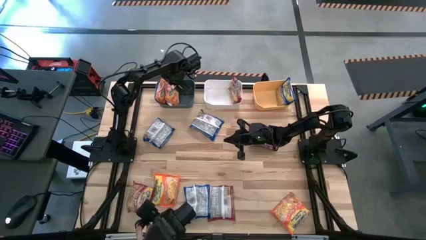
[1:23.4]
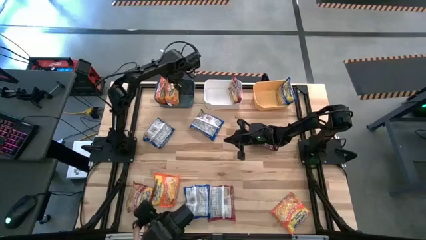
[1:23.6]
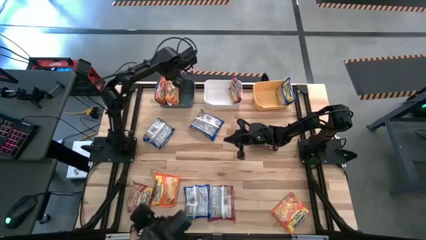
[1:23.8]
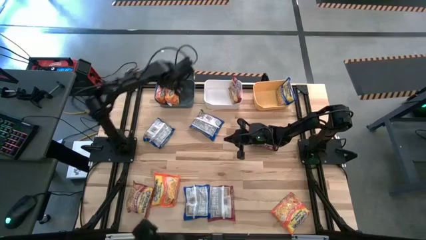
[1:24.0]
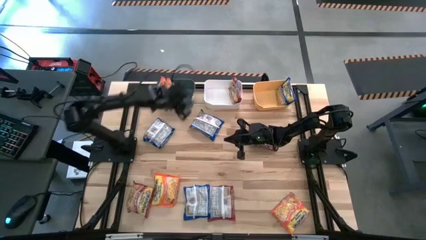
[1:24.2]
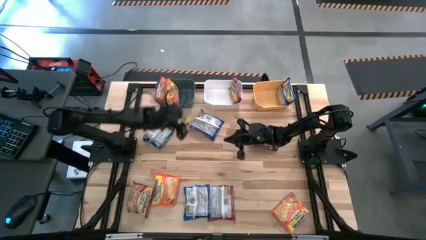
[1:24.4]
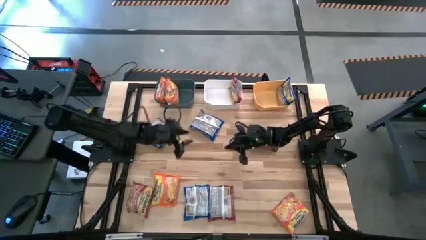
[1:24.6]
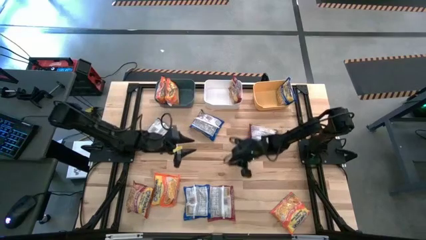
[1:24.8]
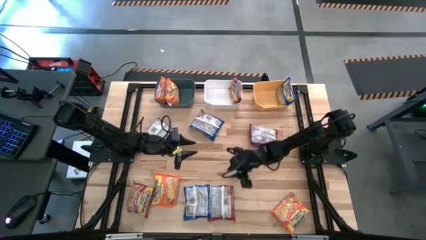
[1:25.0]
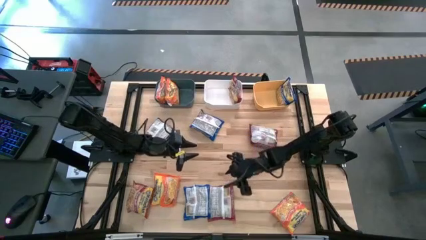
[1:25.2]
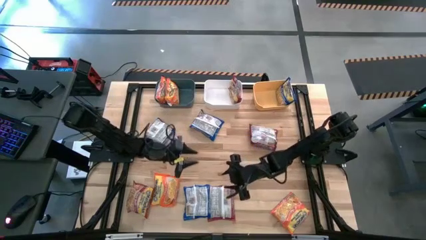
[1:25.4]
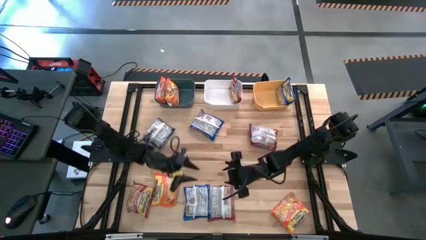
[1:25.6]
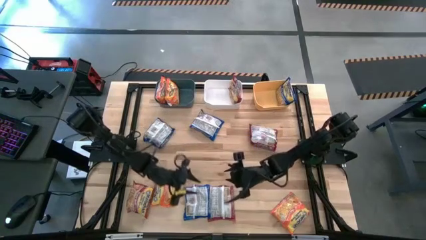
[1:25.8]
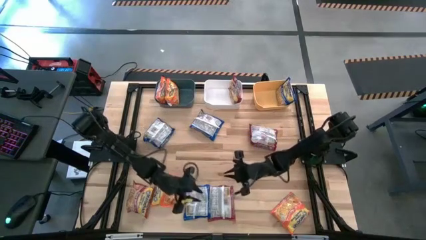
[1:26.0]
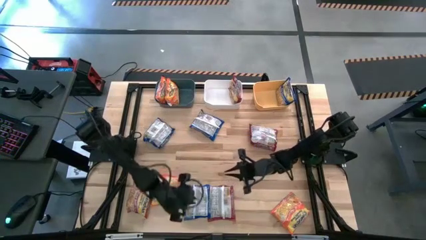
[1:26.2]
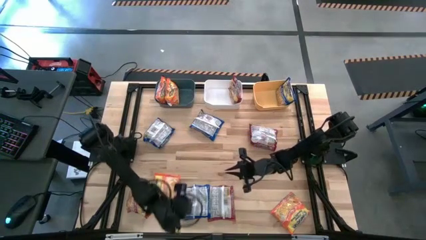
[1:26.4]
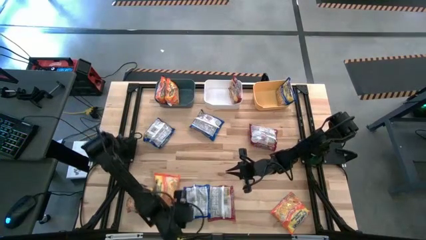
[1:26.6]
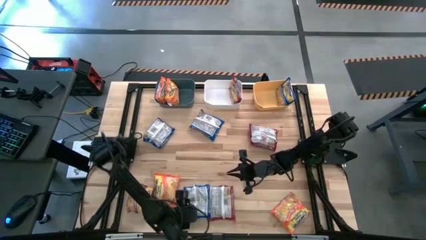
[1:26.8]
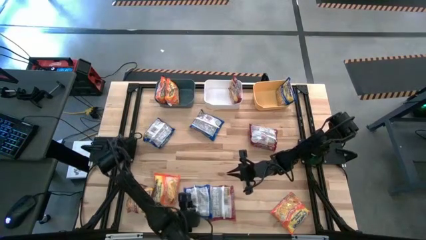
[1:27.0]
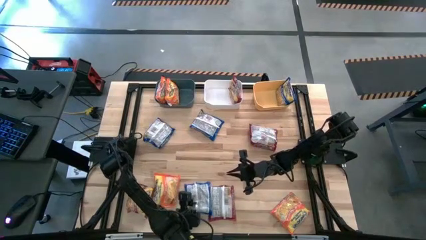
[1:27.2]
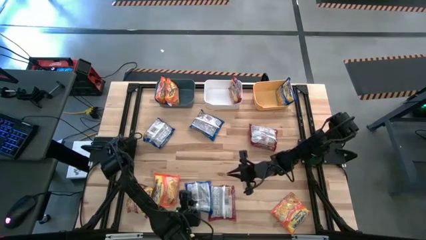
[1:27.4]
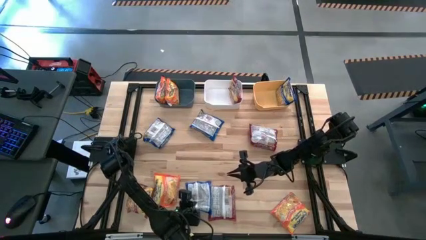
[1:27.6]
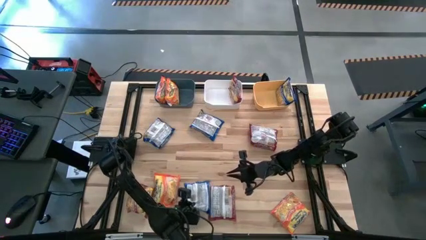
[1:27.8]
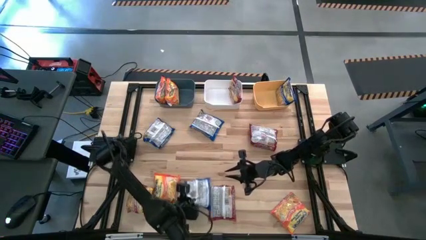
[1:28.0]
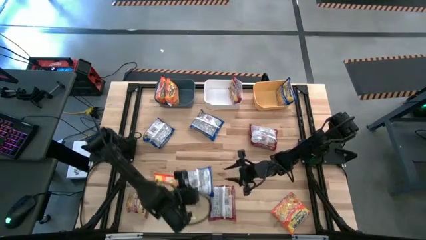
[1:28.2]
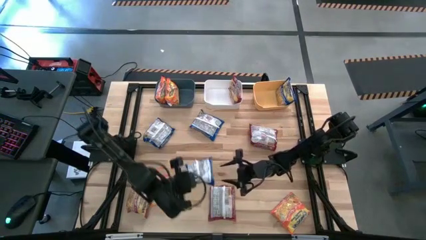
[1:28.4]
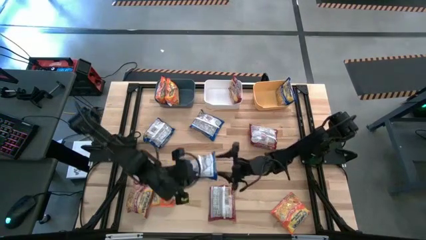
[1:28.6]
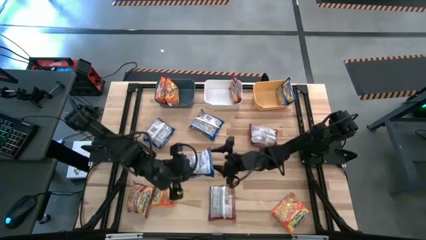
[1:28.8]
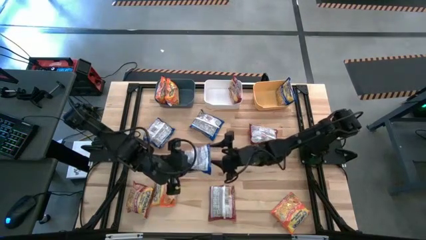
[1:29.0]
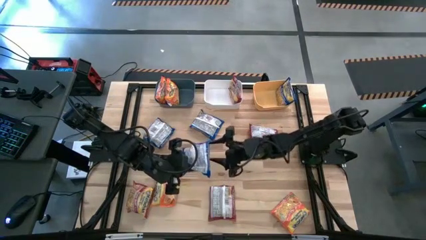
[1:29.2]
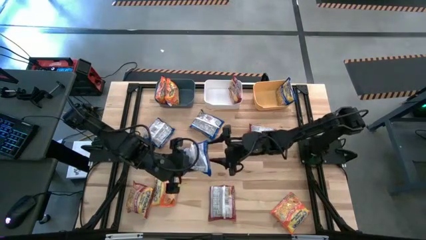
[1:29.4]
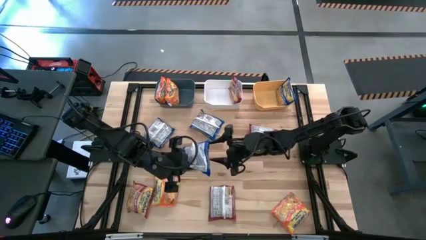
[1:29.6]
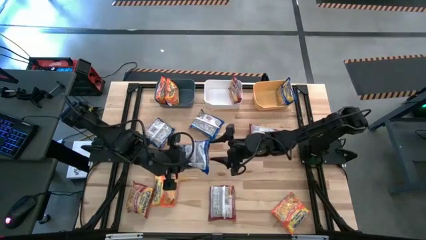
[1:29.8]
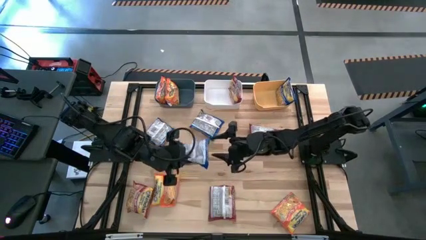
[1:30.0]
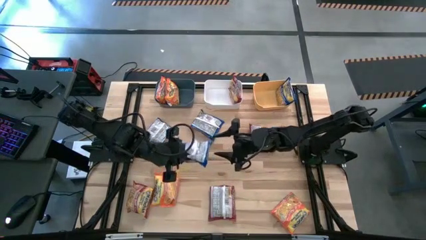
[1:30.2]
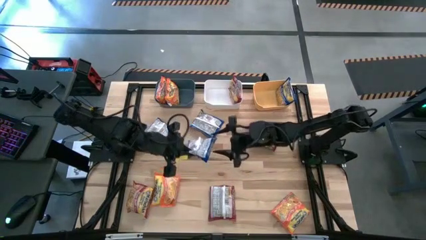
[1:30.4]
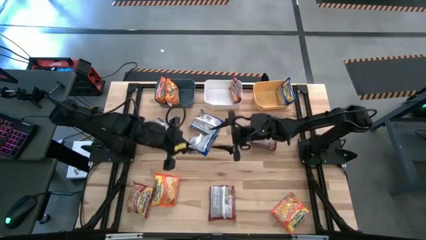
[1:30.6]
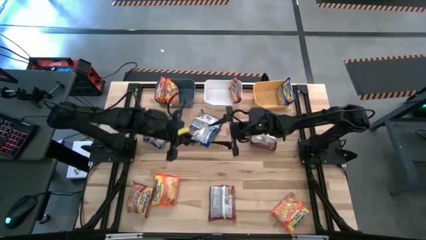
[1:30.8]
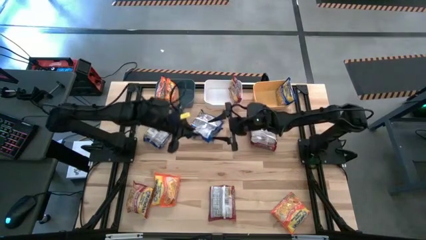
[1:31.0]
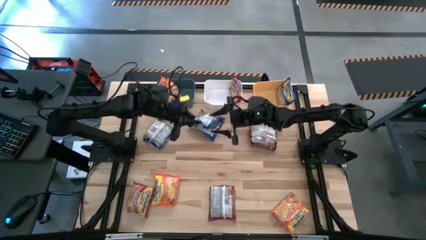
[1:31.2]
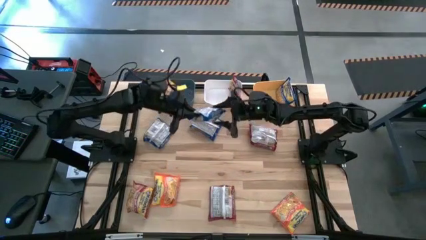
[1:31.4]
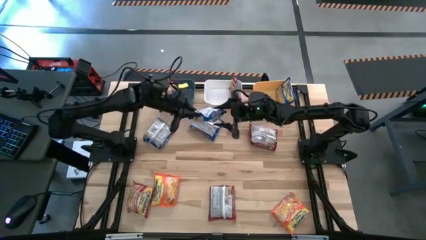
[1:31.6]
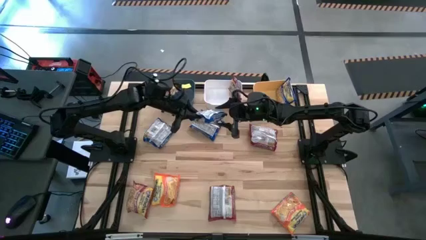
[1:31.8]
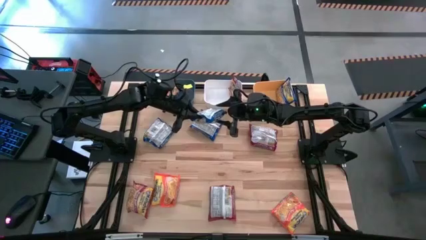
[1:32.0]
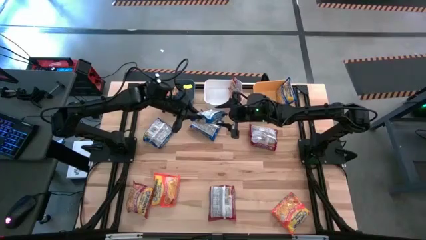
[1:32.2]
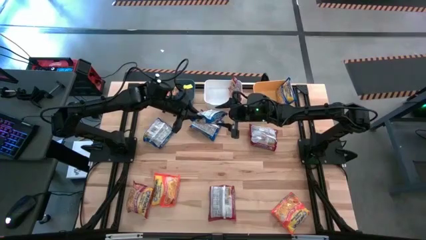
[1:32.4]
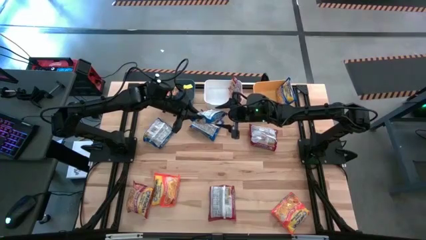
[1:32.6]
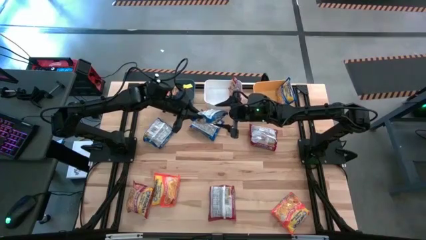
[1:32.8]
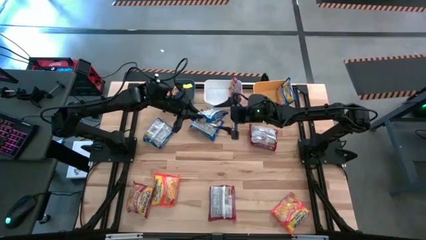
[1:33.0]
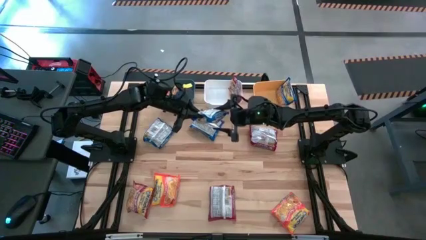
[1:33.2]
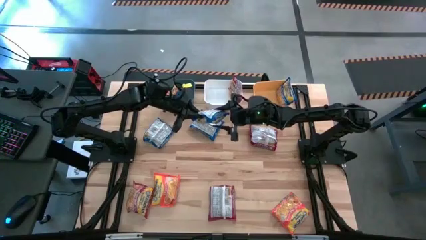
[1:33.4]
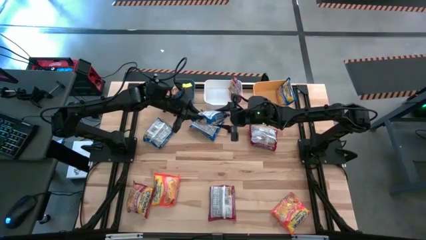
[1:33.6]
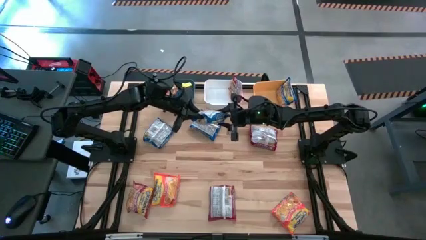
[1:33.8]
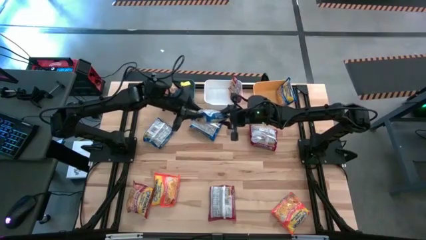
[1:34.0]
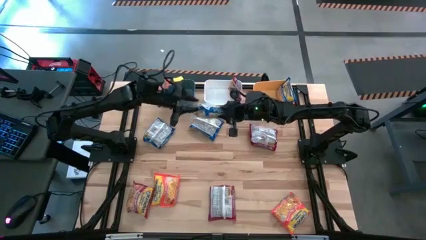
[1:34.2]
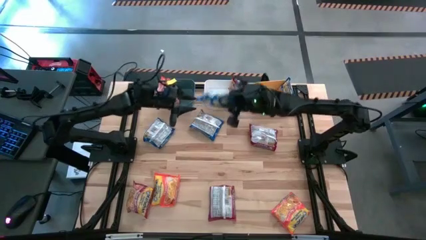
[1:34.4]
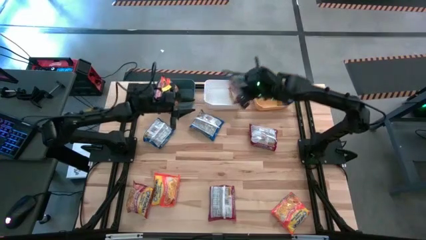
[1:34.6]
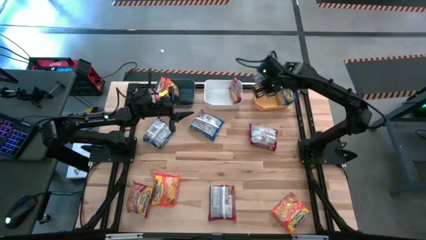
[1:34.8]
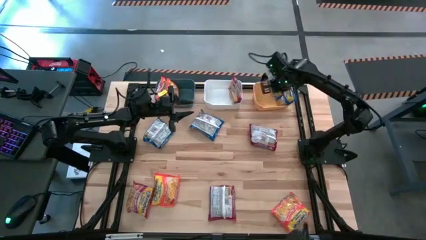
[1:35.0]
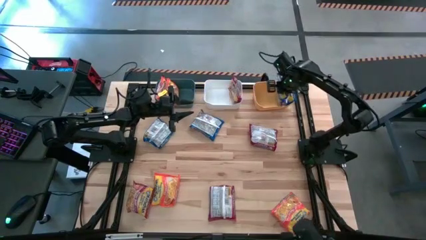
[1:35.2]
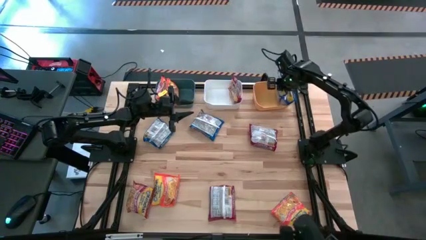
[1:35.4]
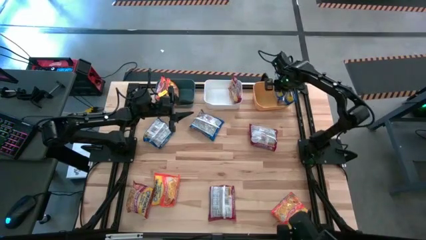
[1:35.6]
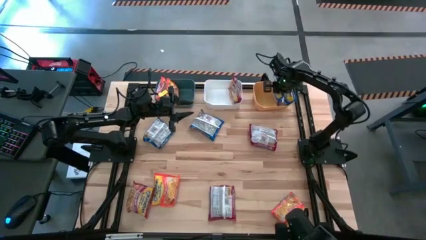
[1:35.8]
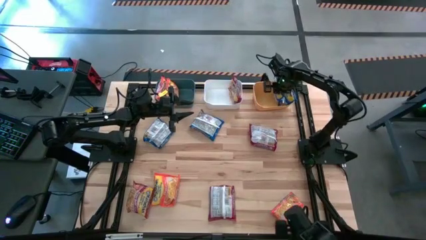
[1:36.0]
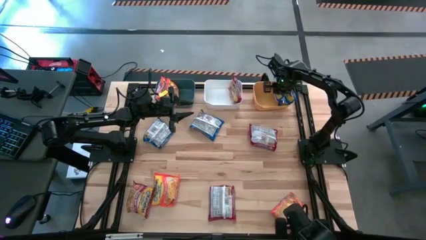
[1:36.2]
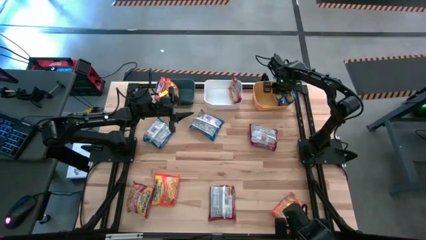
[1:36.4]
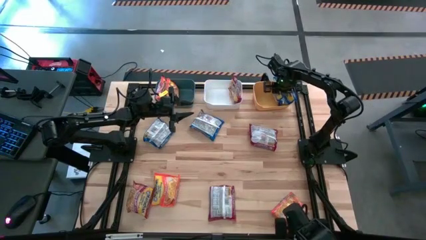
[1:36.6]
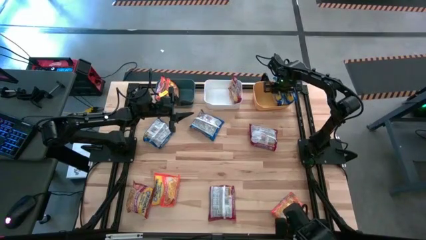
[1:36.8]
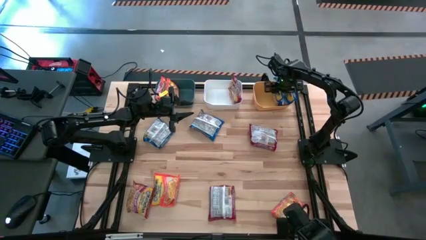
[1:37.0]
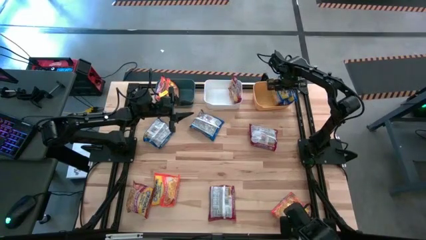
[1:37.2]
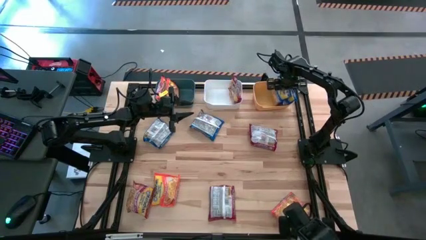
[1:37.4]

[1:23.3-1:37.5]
Task: Sort Maruchan noodles
Put the bottom blue noodle pack into the yellow bin

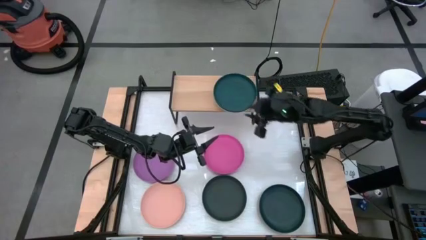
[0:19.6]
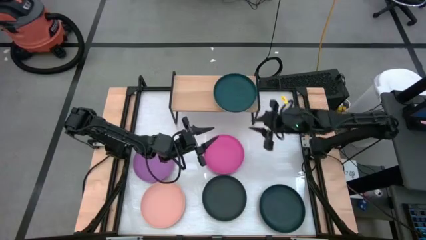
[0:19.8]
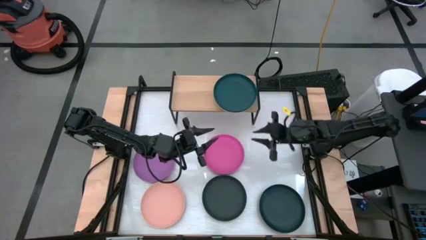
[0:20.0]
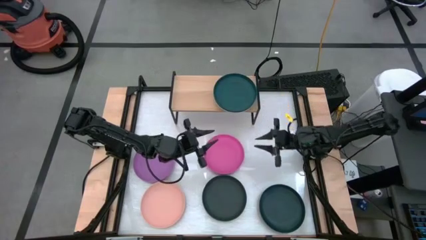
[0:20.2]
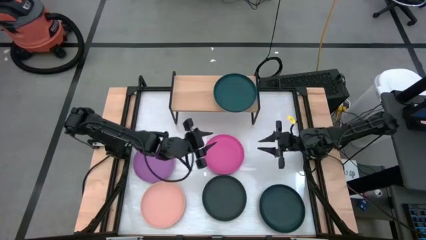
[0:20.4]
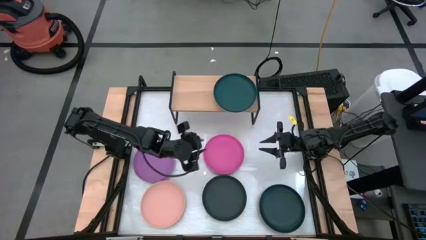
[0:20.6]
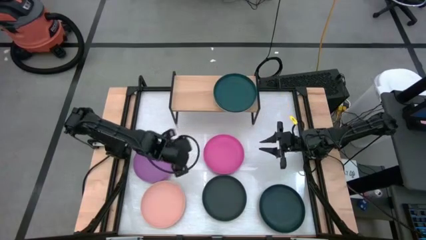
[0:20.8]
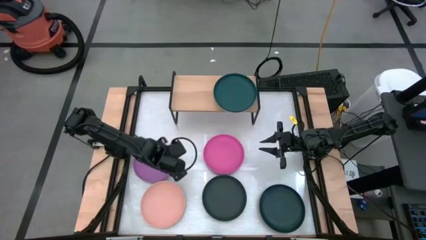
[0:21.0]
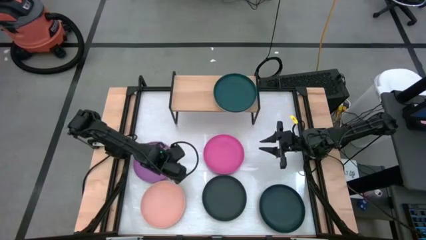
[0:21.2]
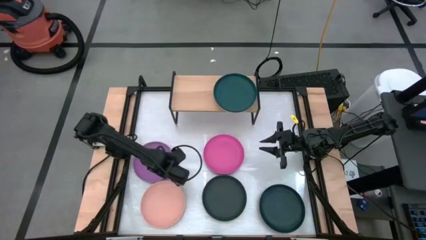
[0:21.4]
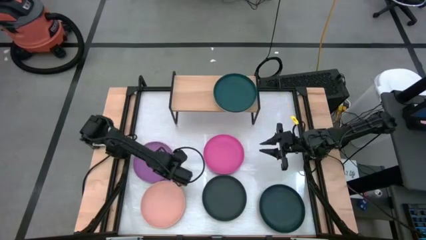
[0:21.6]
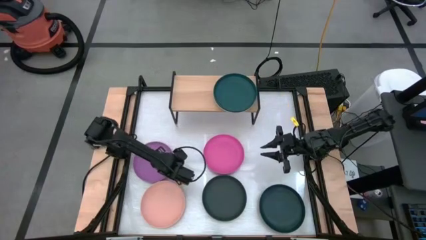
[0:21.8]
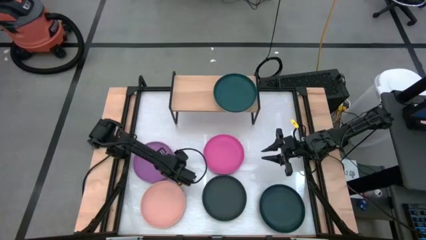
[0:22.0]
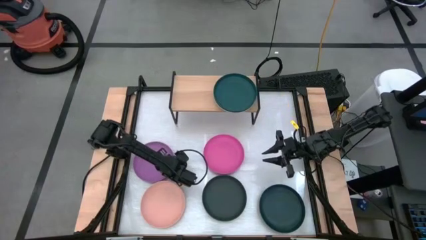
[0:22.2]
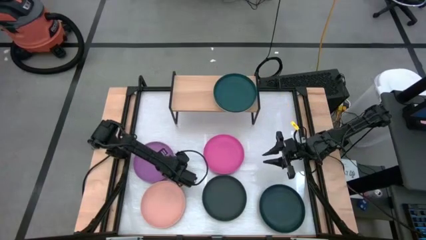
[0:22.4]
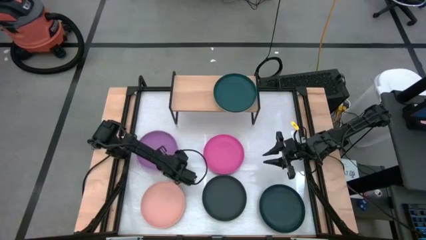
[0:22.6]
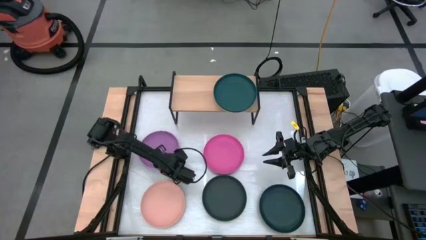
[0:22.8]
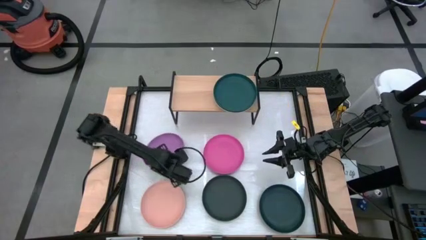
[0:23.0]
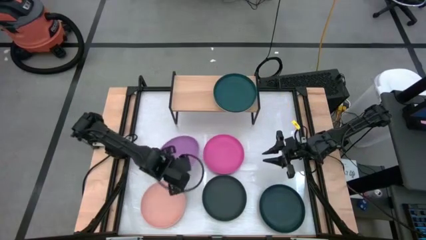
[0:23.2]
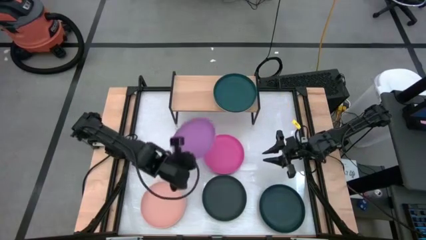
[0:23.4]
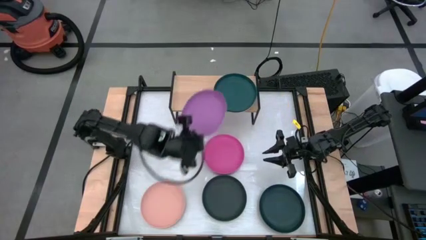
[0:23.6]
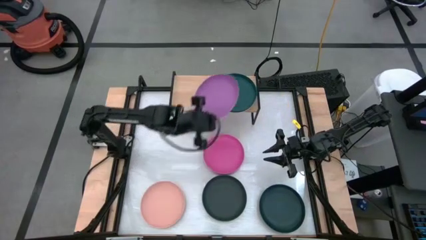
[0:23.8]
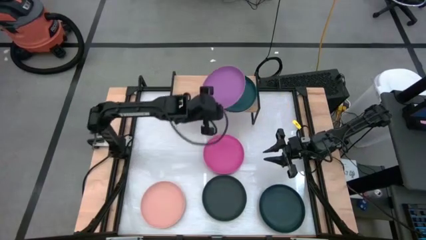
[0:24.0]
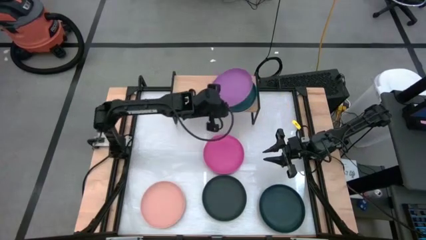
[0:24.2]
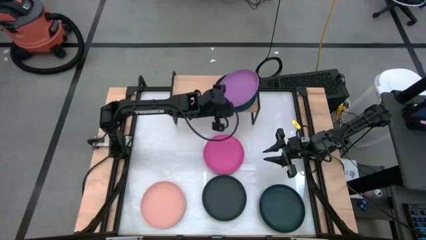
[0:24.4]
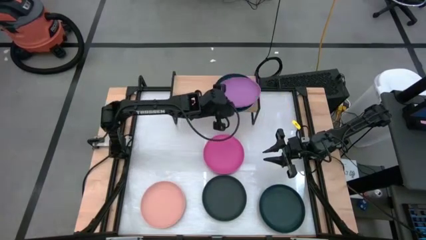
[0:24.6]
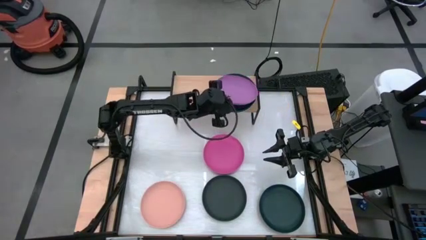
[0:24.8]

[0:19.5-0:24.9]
Task: Place and stack plates onto a shelf
Stack the purple plate on top of the dark green plate on the shelf
